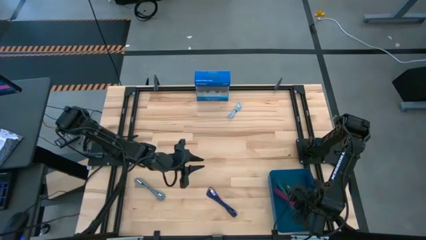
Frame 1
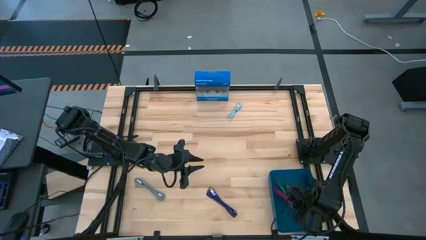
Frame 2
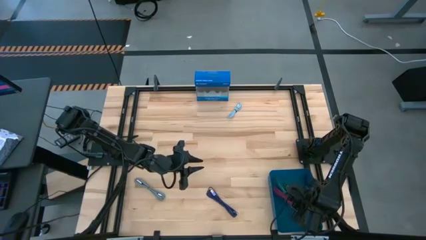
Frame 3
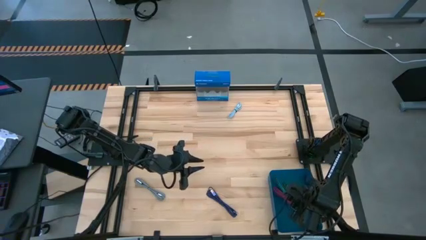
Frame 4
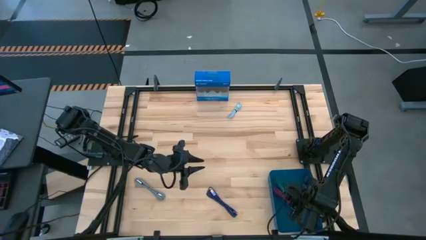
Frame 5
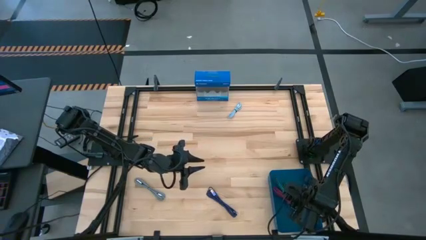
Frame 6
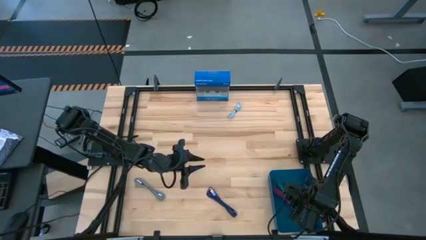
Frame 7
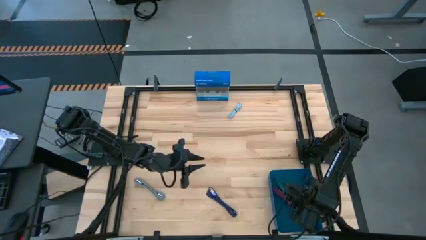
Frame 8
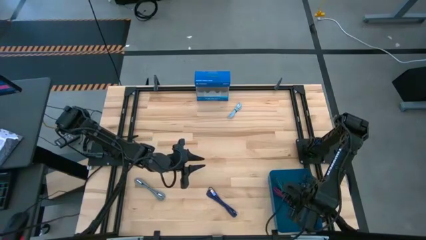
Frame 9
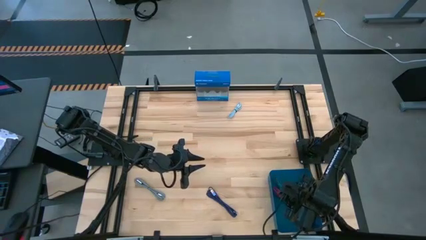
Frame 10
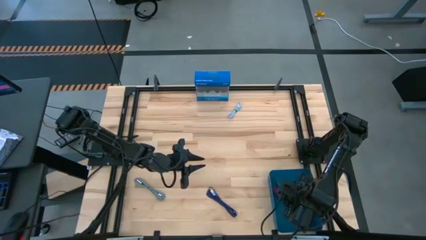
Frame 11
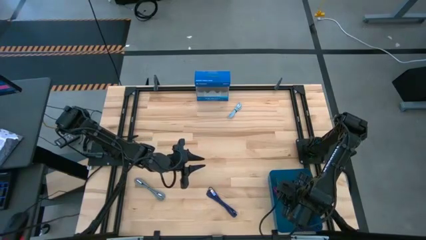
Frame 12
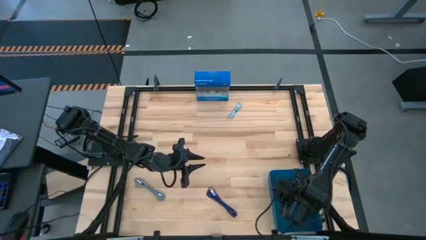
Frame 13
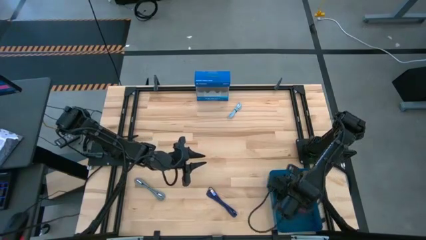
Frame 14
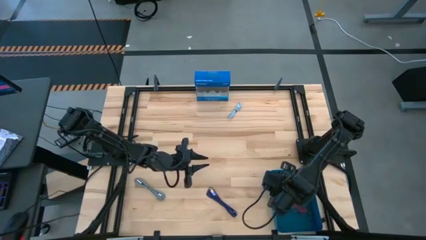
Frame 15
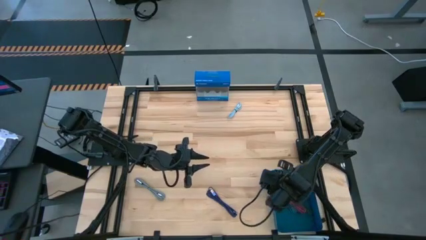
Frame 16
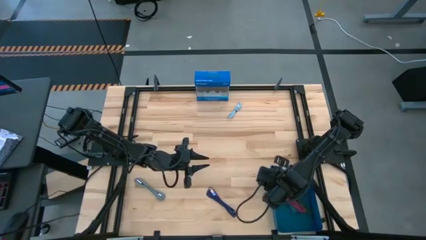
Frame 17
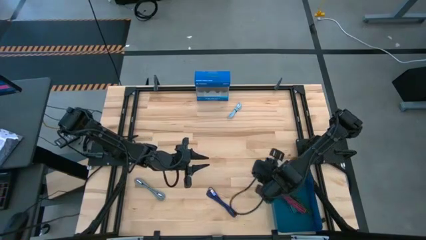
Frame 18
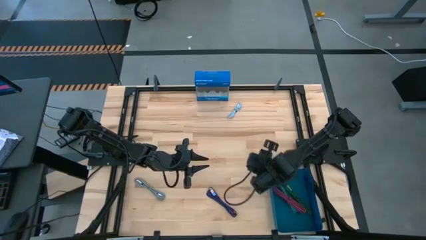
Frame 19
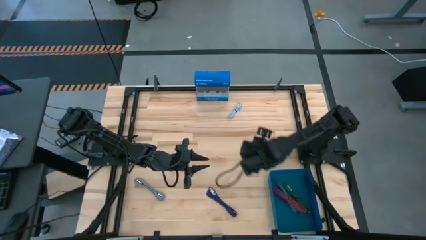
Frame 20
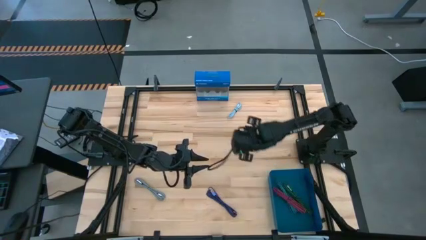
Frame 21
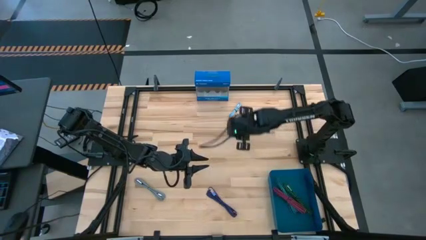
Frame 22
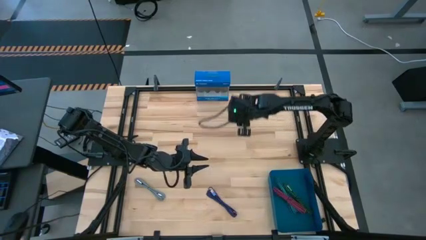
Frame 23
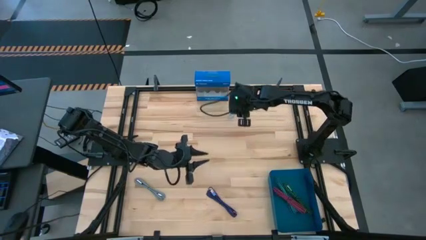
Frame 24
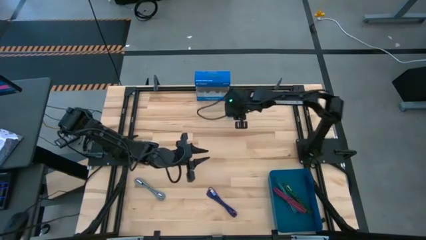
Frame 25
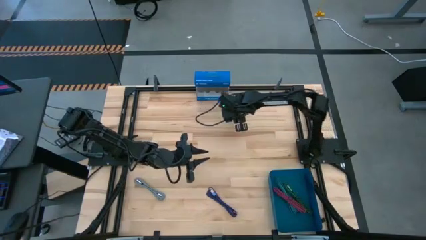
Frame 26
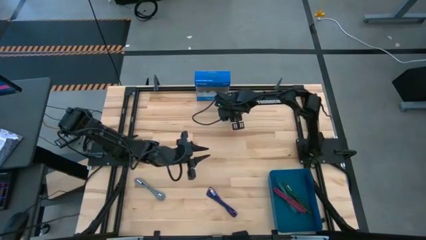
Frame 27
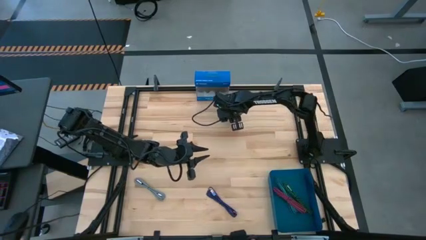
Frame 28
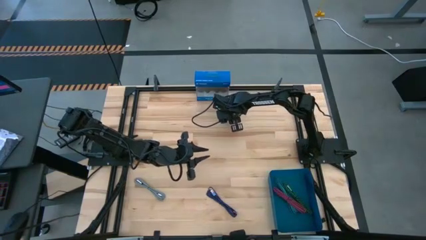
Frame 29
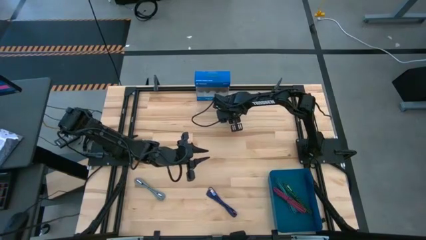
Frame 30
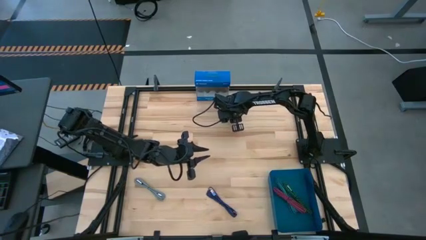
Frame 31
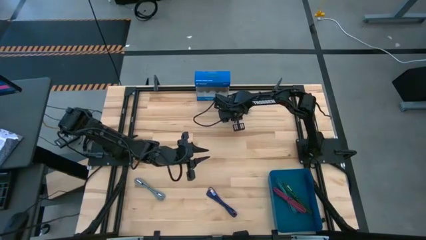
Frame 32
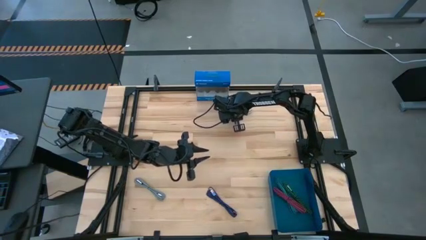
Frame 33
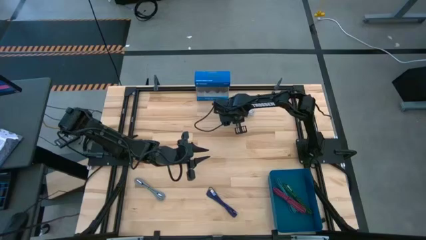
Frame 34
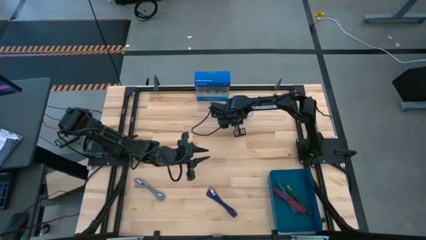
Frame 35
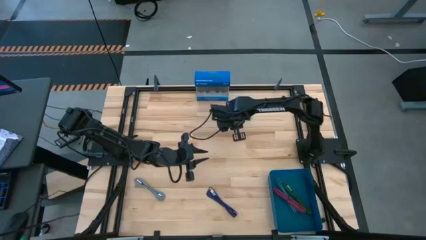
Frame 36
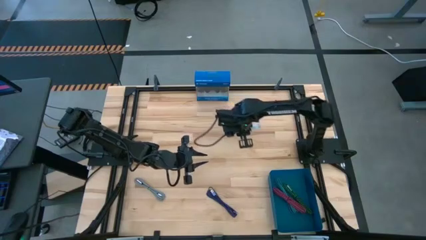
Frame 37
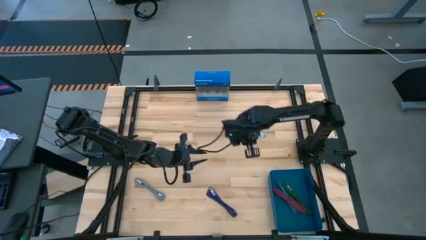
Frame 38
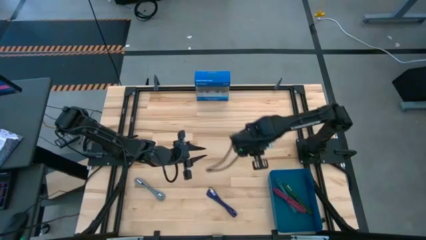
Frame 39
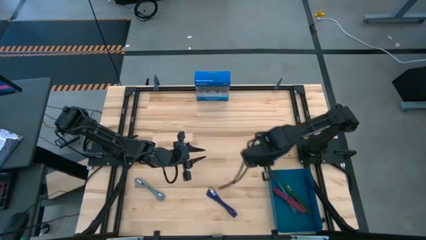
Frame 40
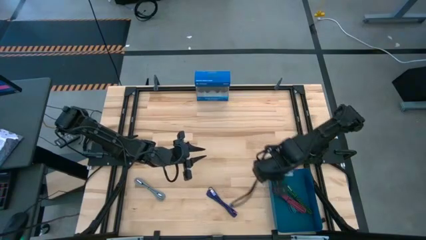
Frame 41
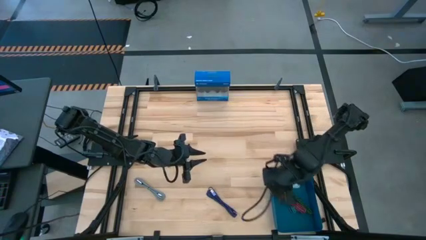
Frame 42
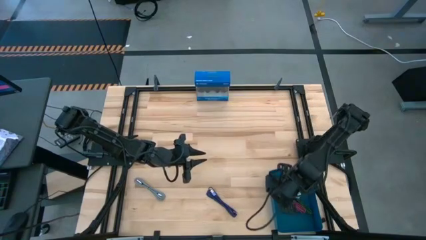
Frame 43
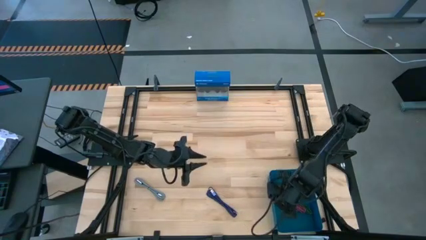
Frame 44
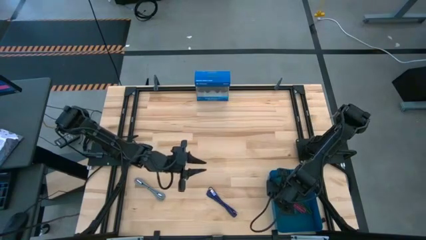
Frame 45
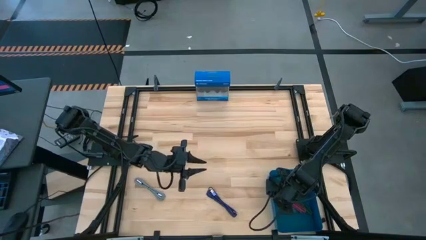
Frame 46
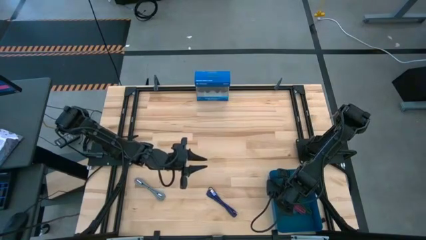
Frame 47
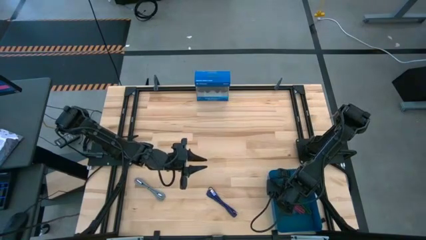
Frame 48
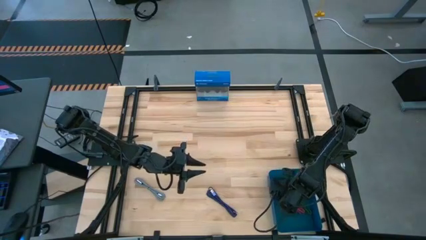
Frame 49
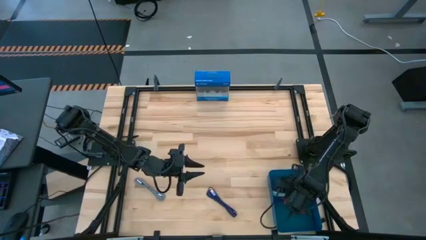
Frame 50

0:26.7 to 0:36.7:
Task: Pick and place USB-C Cables
Put the light blue USB cable into the blue bin

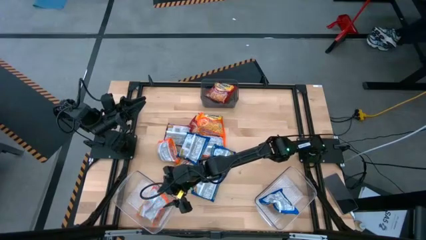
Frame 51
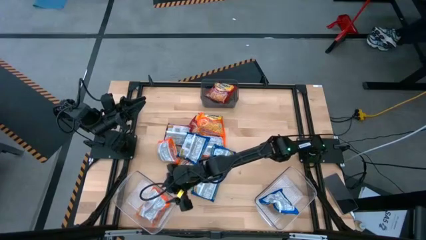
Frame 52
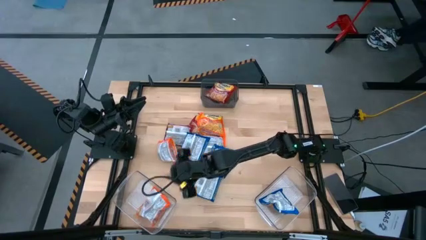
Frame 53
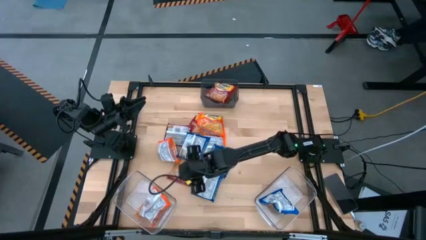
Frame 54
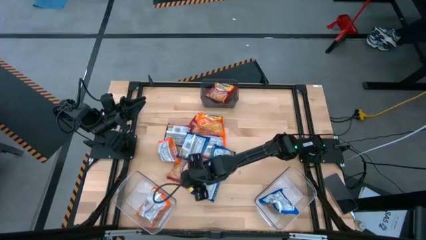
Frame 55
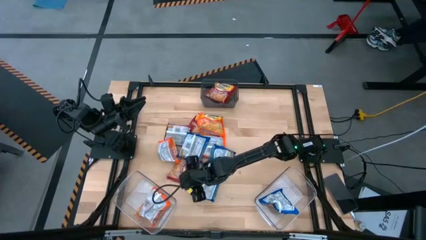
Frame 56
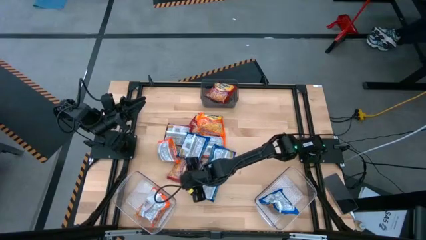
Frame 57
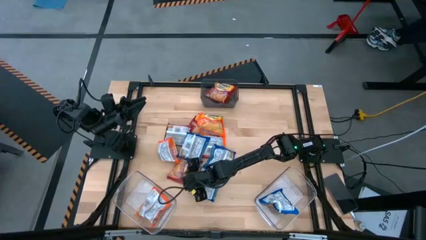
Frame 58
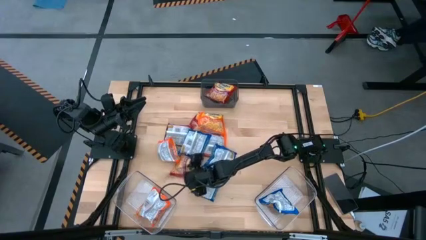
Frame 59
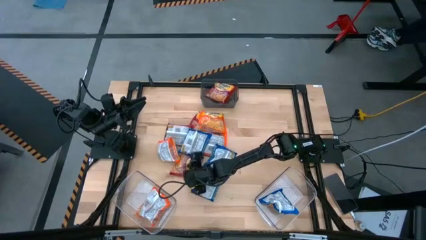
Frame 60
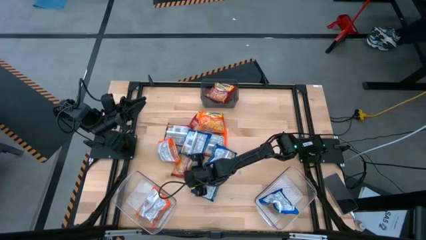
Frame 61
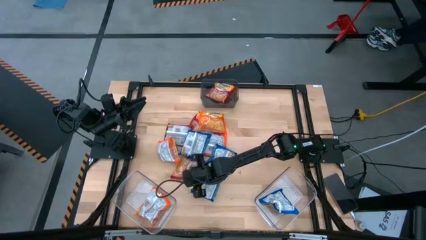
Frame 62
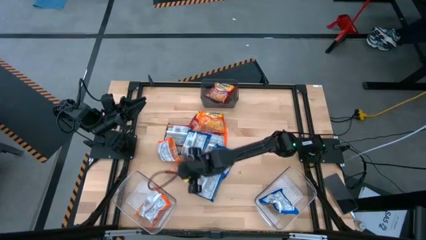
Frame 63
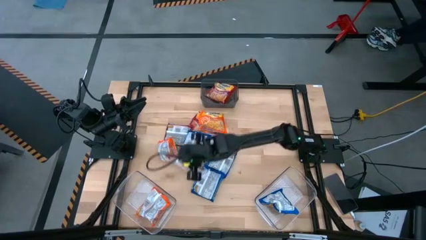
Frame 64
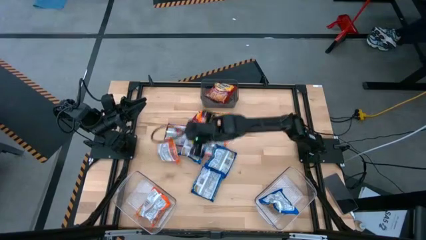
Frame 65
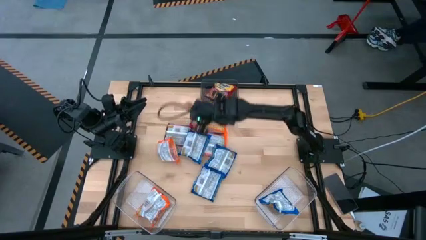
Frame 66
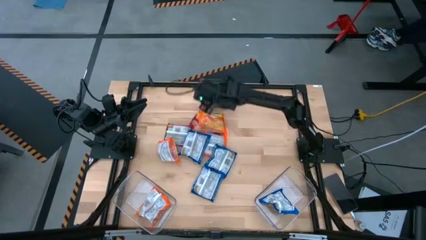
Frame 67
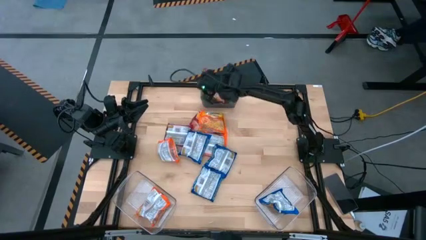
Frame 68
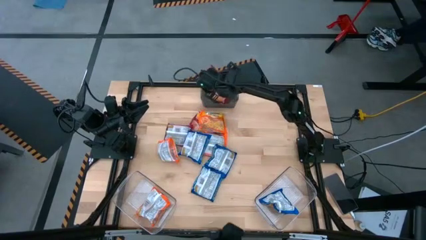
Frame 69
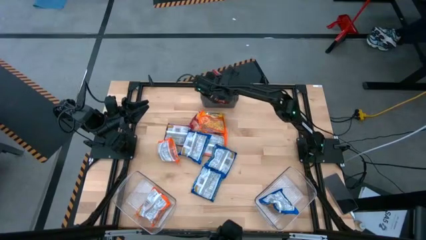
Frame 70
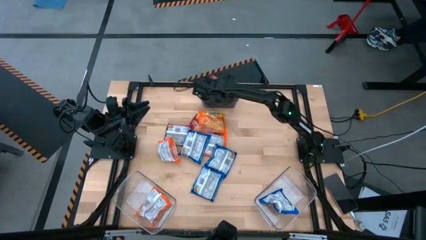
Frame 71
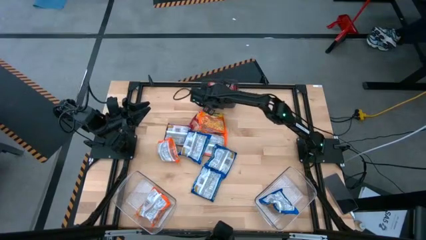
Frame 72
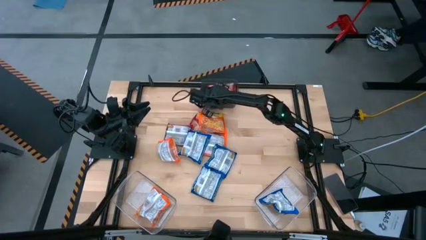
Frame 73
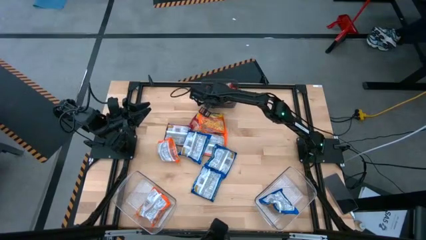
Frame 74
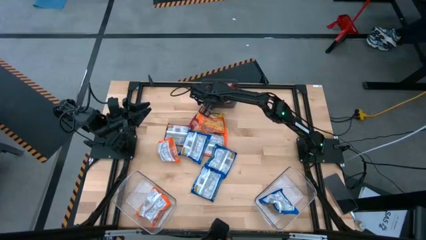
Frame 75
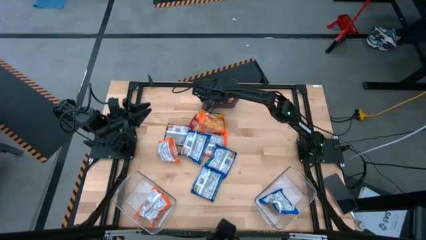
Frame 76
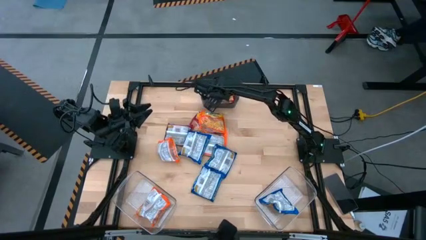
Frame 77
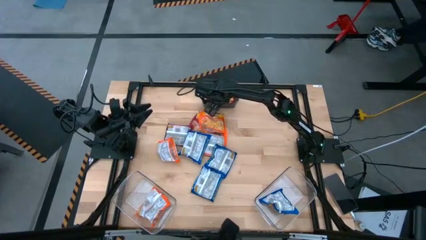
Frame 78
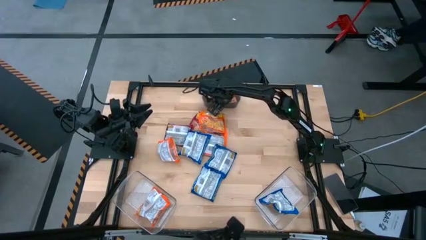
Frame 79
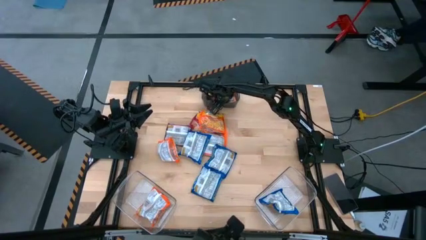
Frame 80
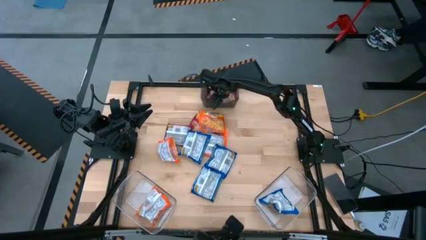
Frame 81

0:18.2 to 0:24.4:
Task: Sort Maruchan noodles
Put the red noodle pack into the black bin
